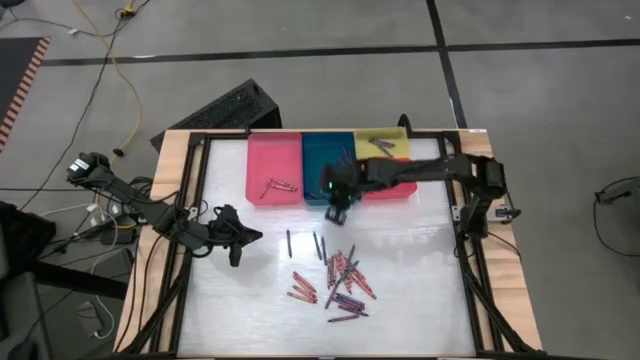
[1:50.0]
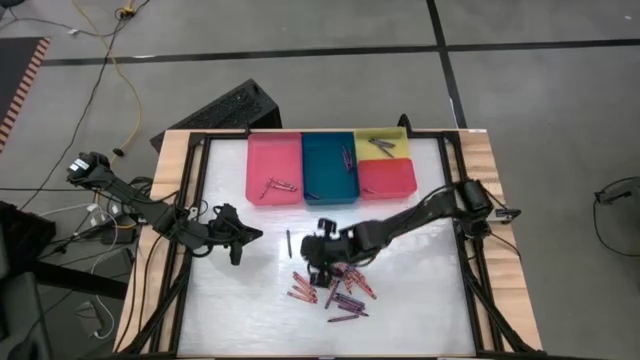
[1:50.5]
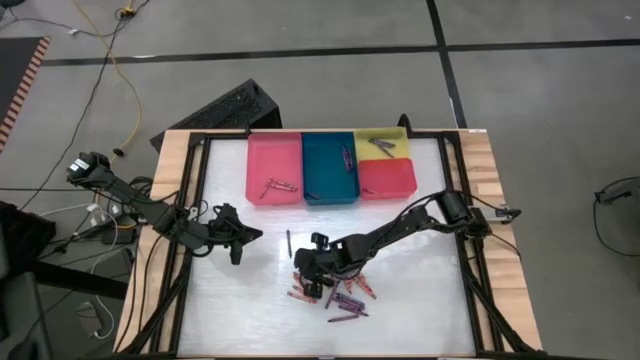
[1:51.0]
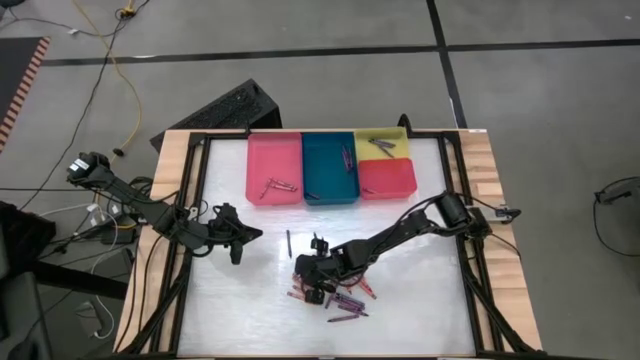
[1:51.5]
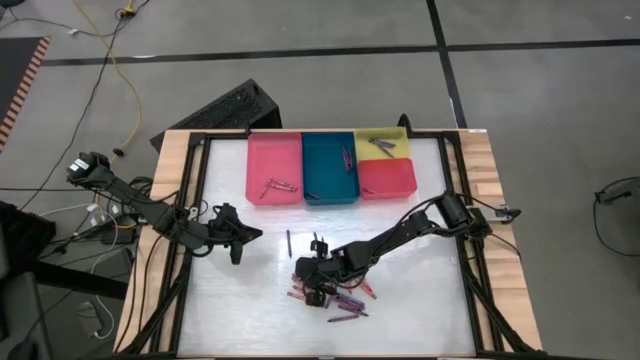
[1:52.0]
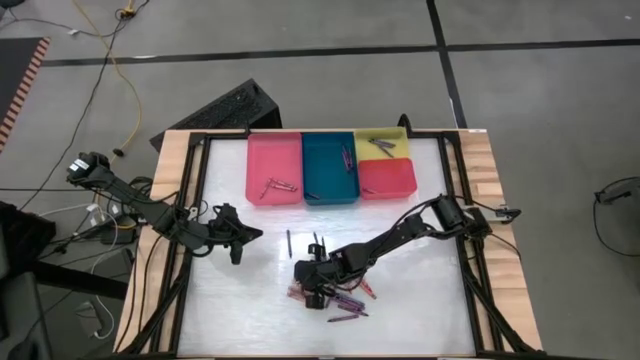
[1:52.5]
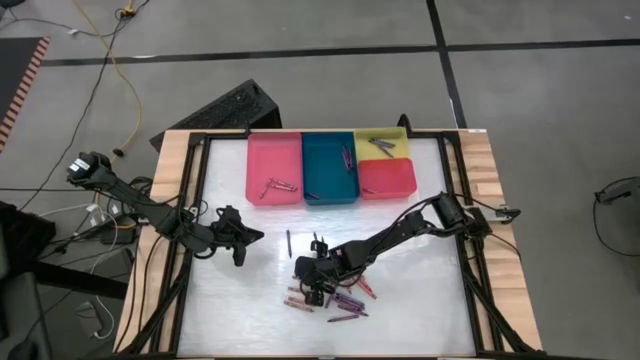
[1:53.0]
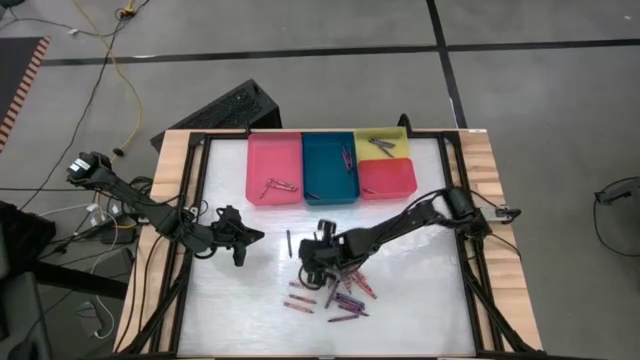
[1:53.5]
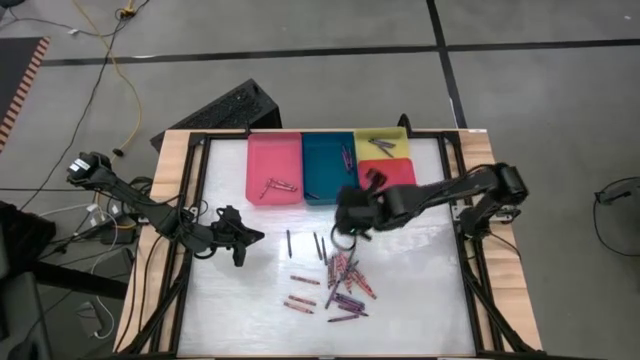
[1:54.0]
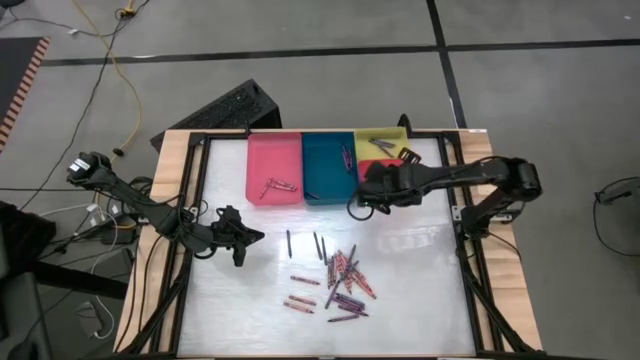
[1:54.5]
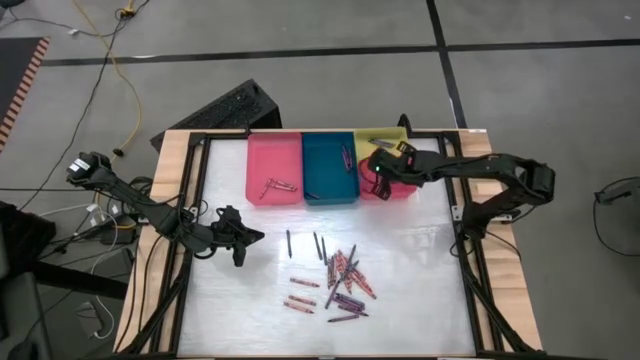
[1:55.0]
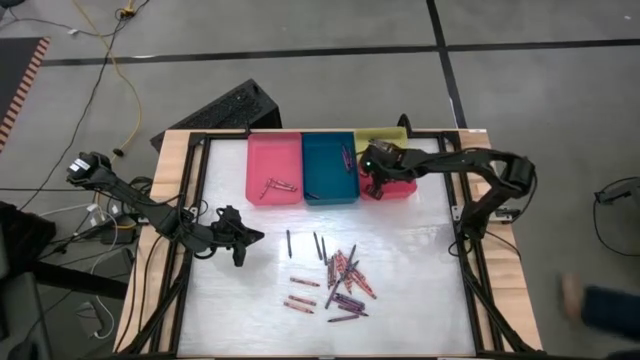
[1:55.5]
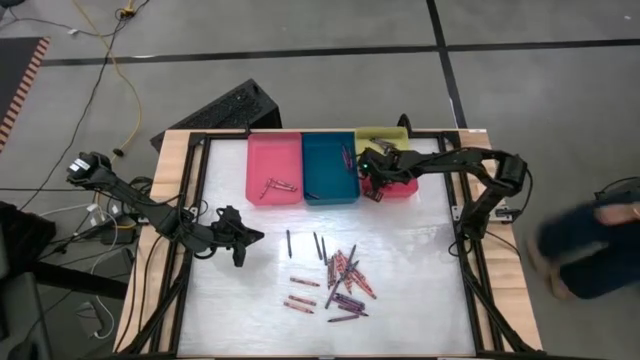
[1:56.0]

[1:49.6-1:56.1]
Task: Sort crayons
Put the red crayon into the red bin

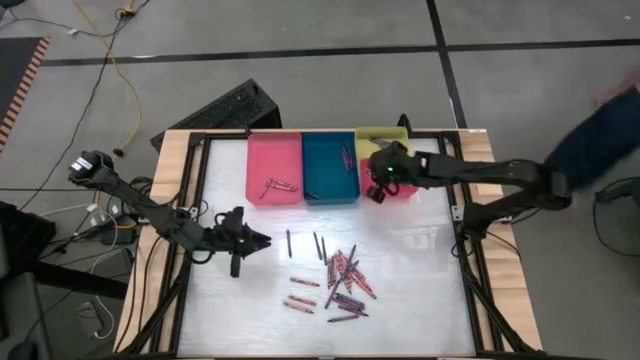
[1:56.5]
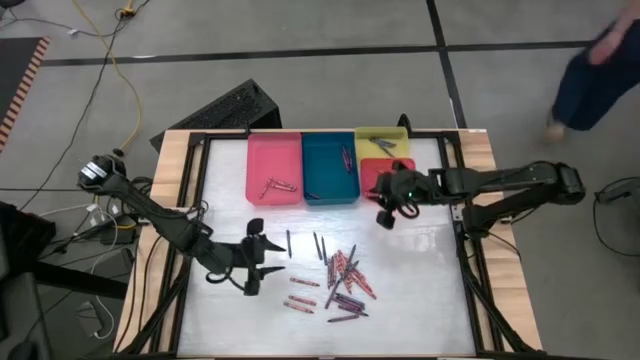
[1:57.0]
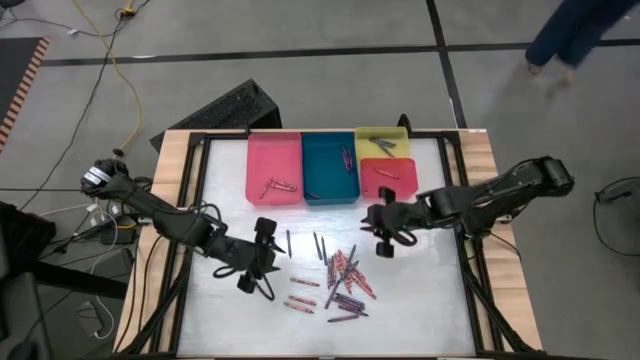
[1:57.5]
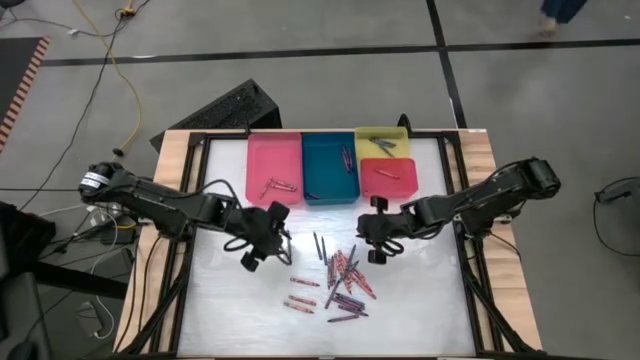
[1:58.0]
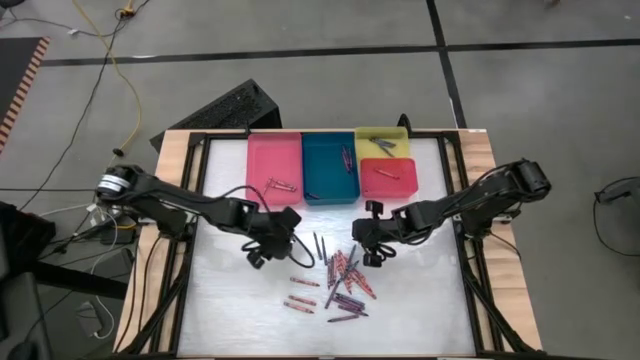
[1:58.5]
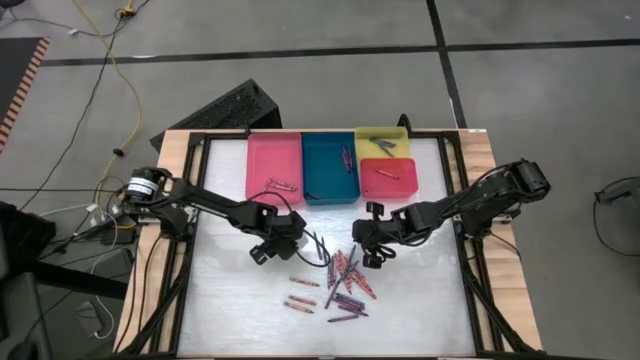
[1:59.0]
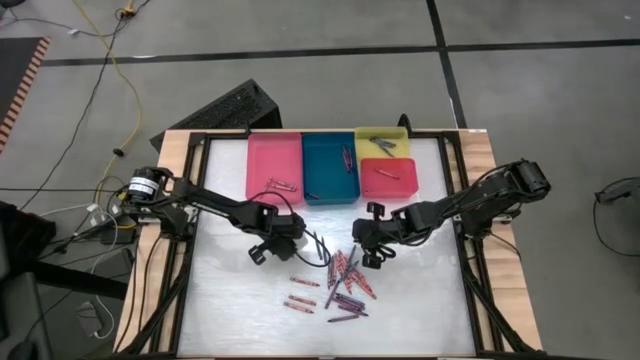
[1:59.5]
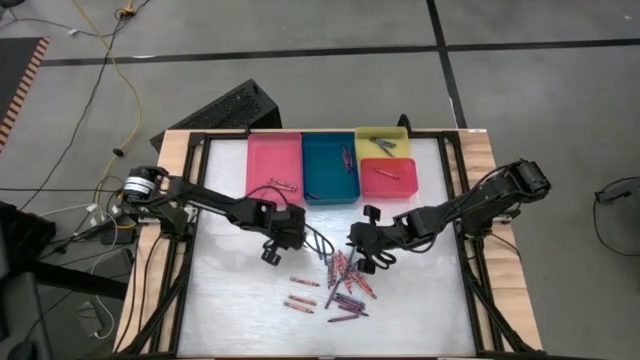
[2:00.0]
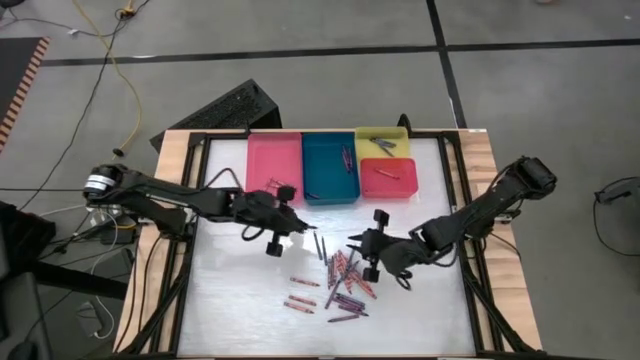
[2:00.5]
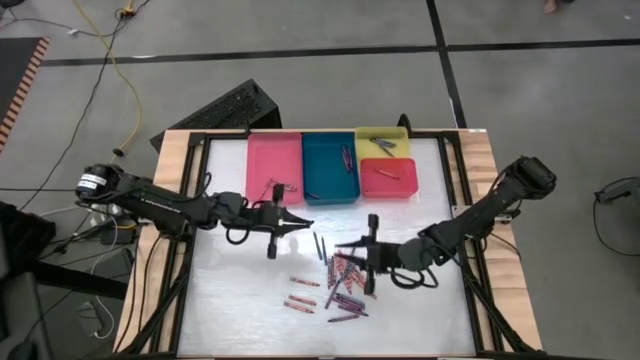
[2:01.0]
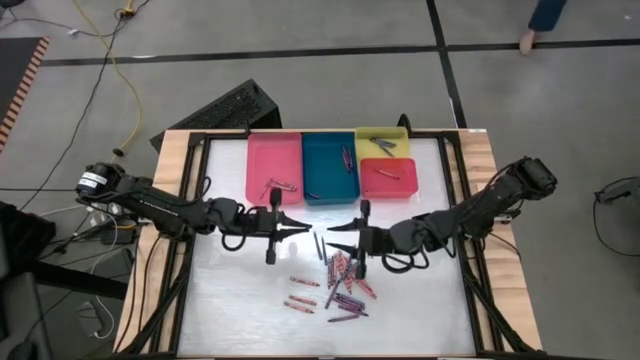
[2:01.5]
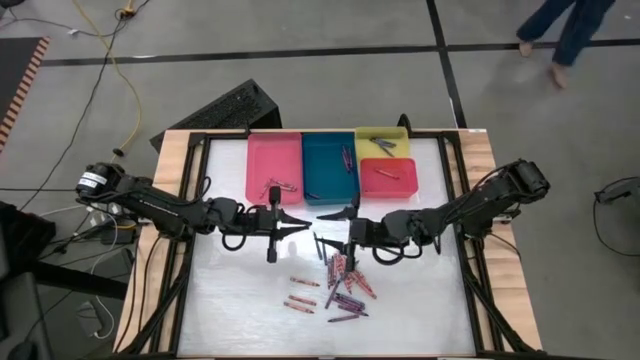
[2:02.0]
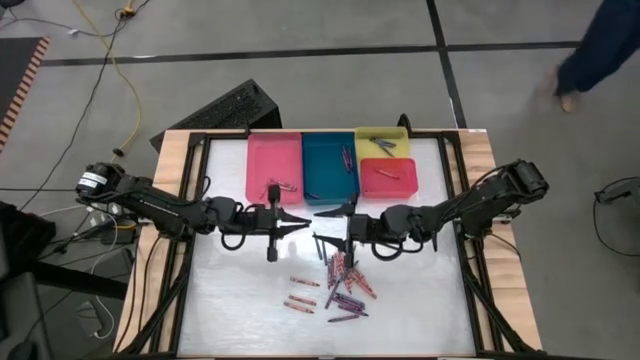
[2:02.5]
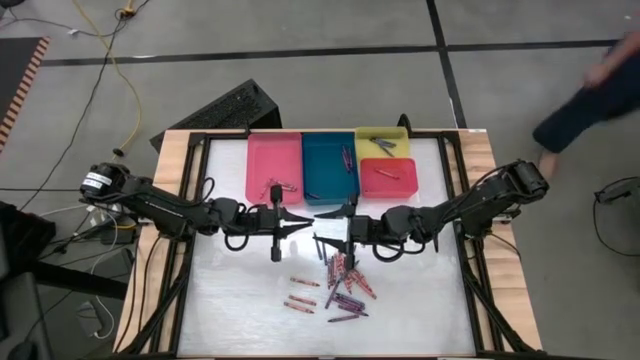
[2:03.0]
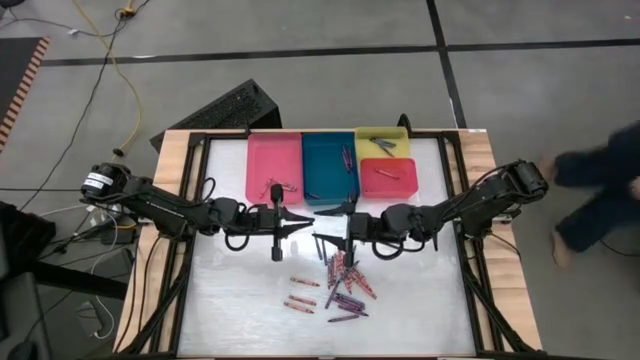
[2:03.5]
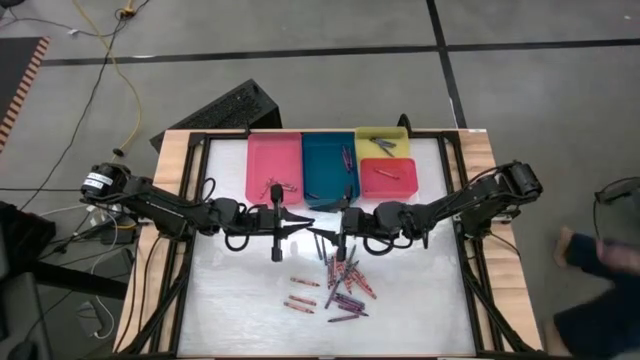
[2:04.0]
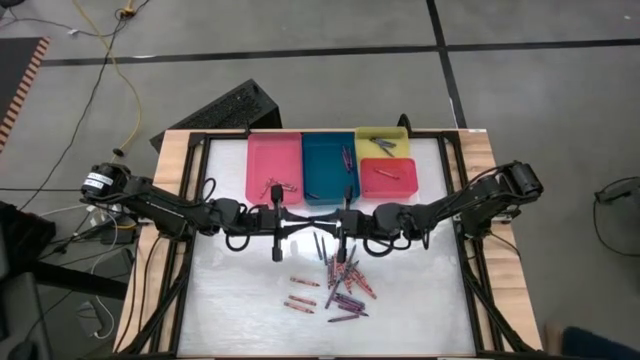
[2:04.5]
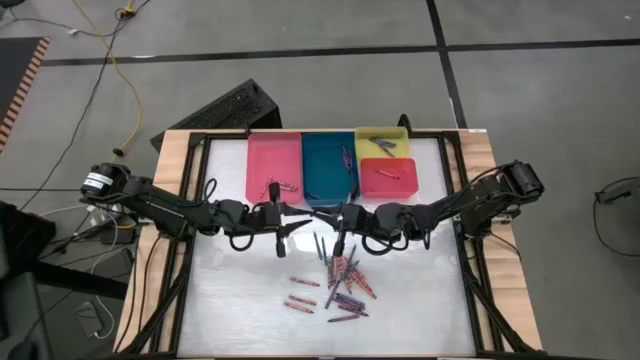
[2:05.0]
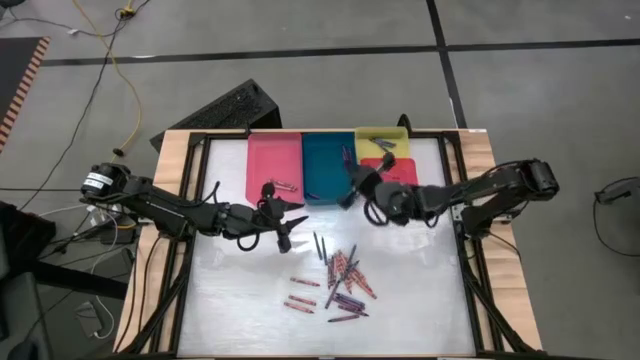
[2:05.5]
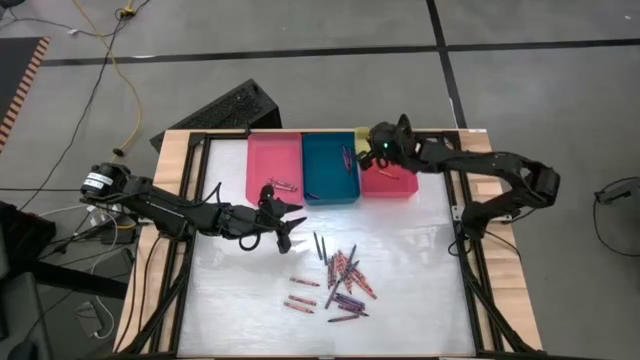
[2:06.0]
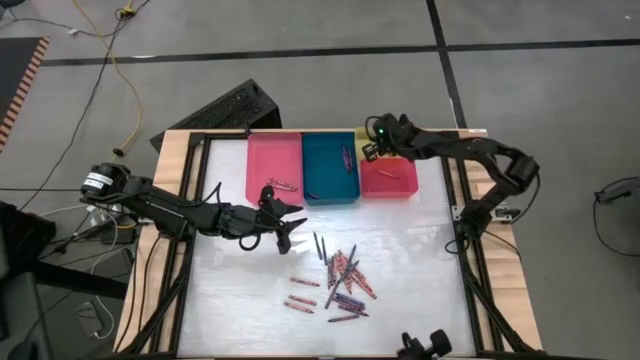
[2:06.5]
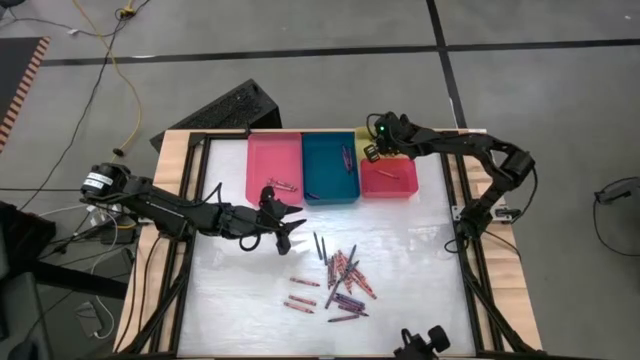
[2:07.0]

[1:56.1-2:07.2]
Put the blue crayon into the yellow bin

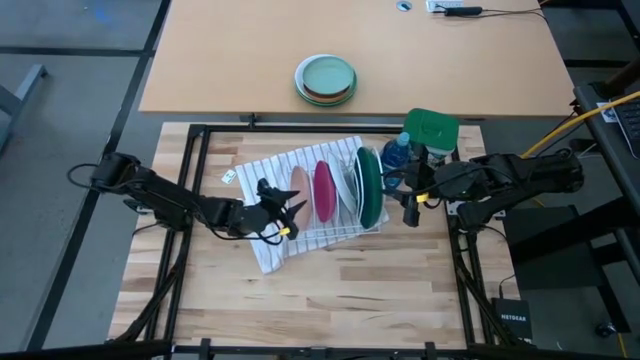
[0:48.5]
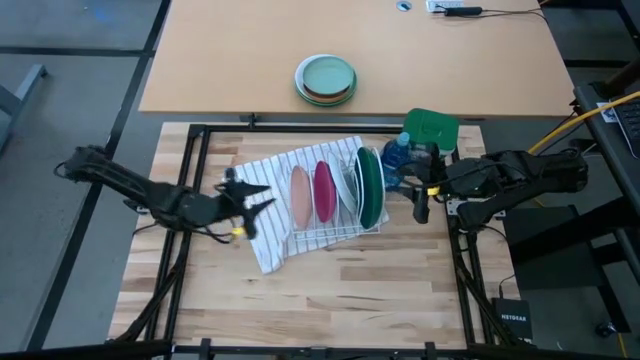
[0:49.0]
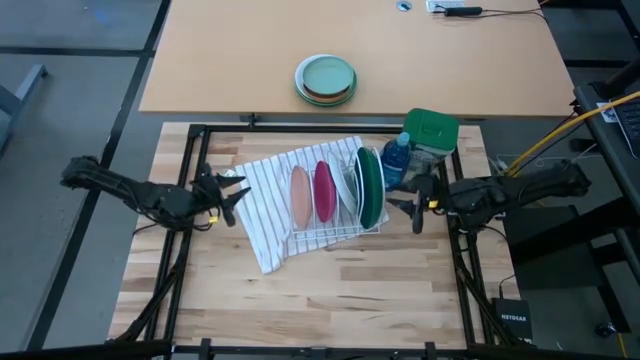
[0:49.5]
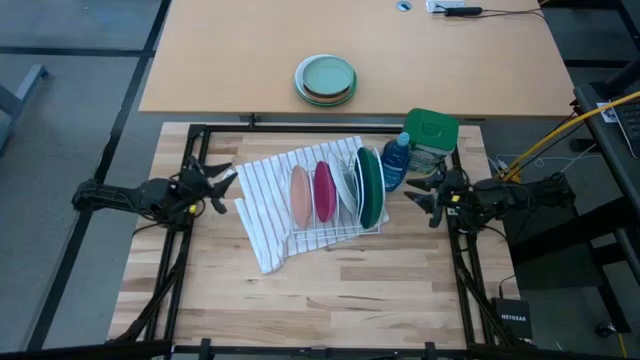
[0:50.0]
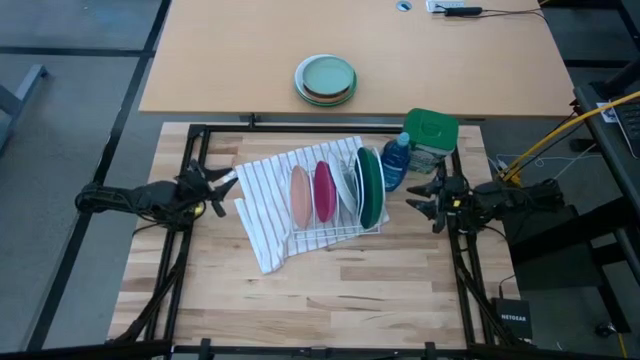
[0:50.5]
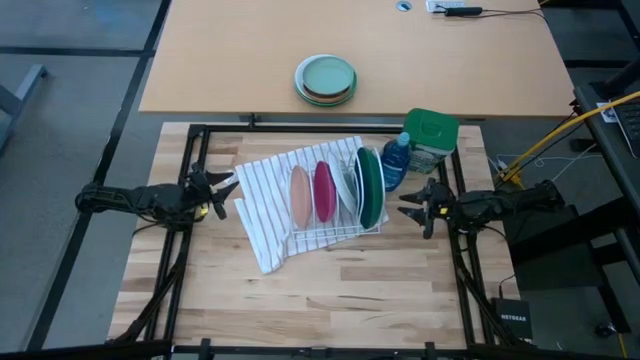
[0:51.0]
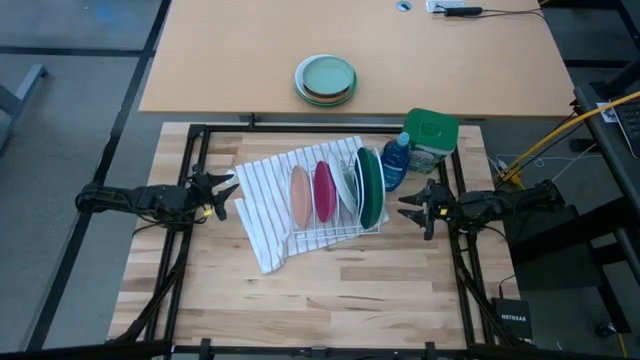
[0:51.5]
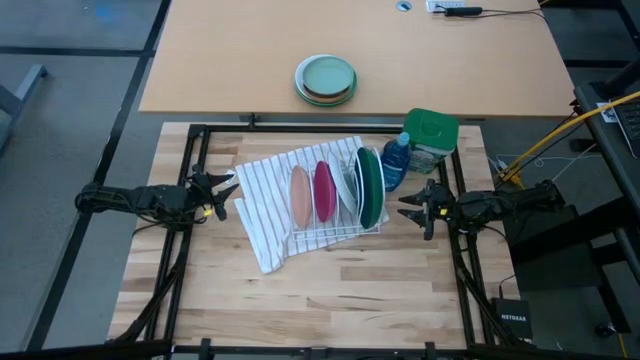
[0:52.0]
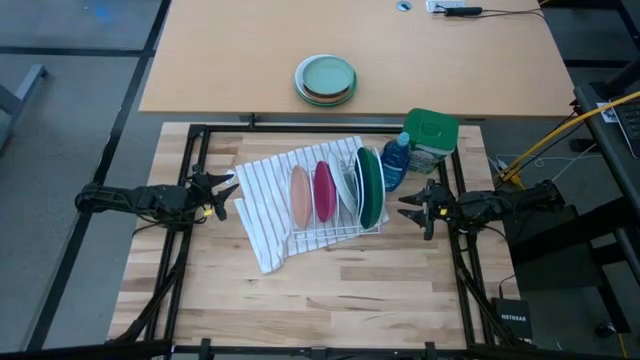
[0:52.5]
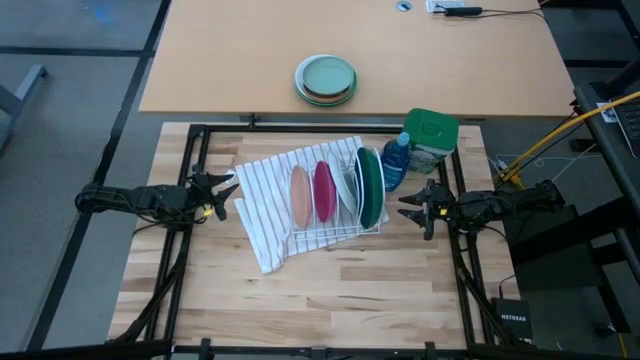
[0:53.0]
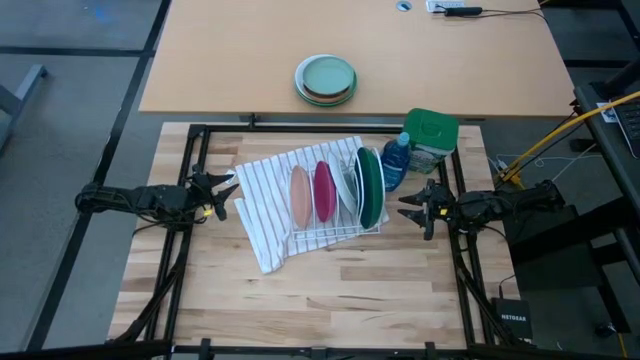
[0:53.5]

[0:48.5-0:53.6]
Task: Sort dishes
Return to Home Position
